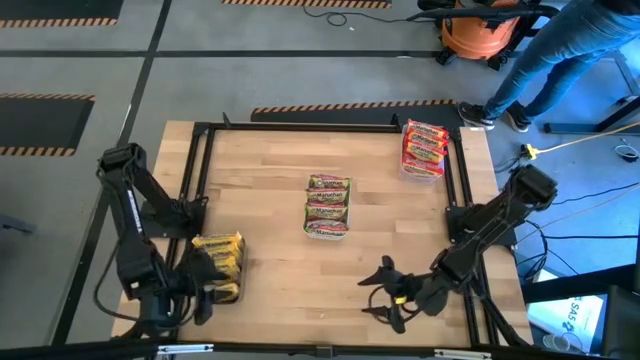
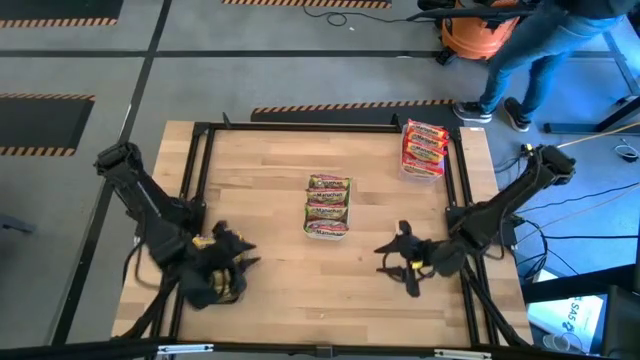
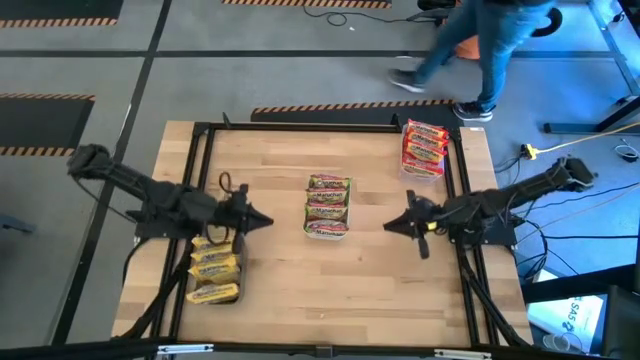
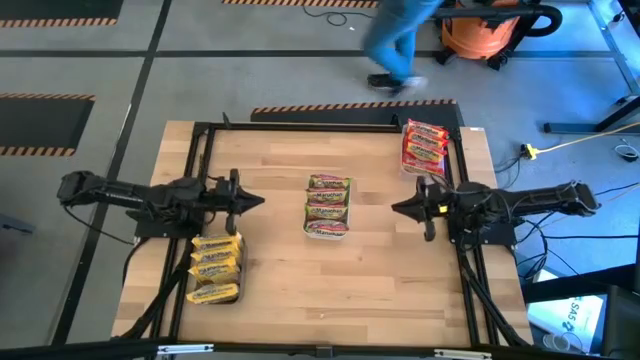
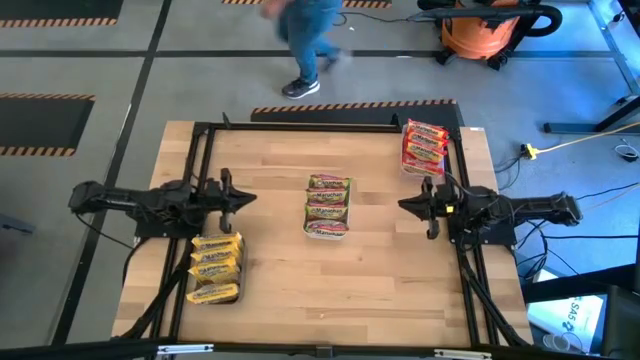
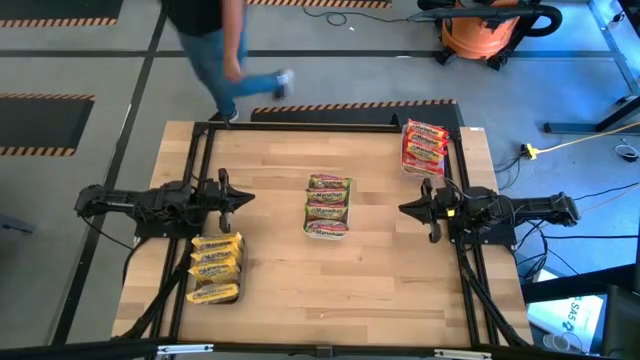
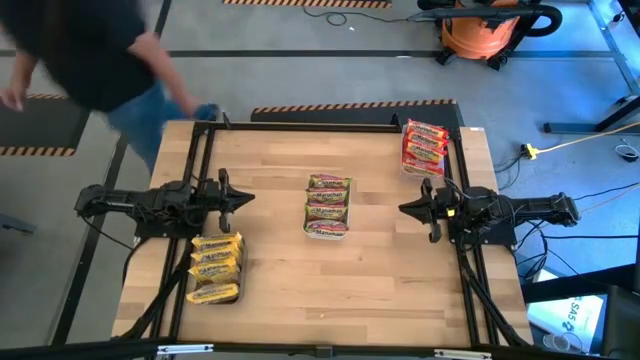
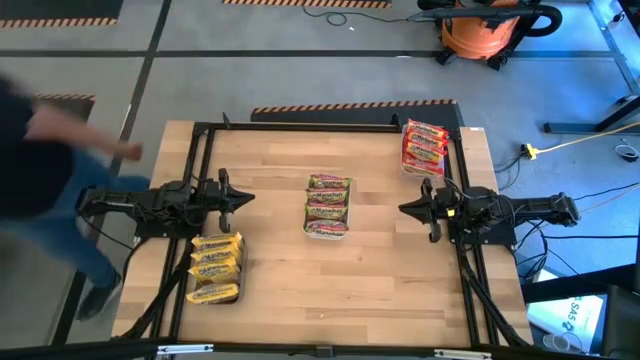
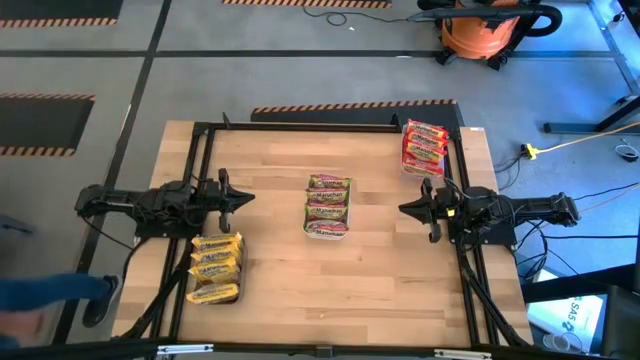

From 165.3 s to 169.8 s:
Task: Sort Maruchan noodles
Return to Home Position

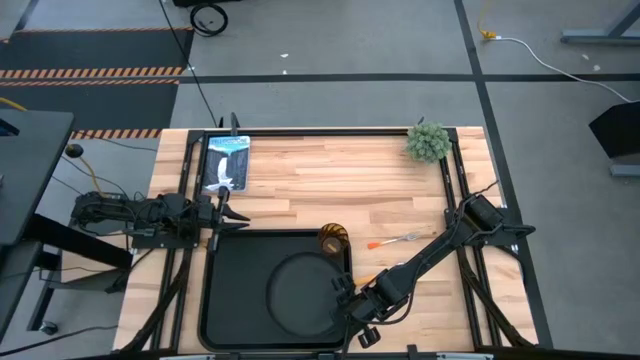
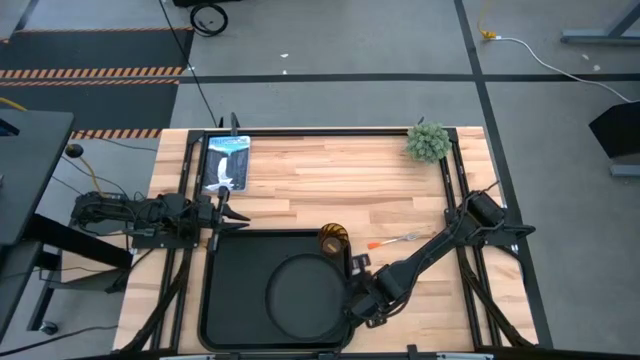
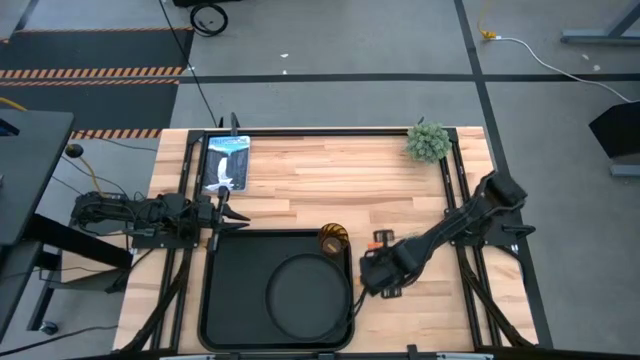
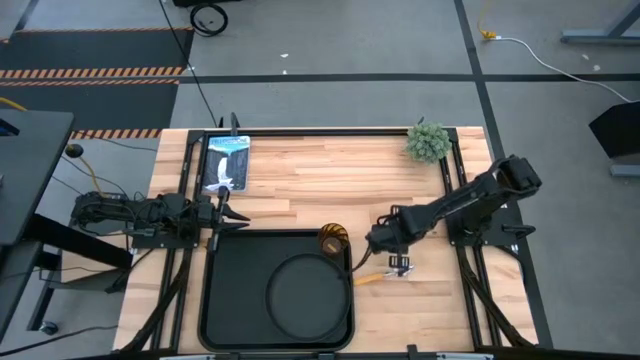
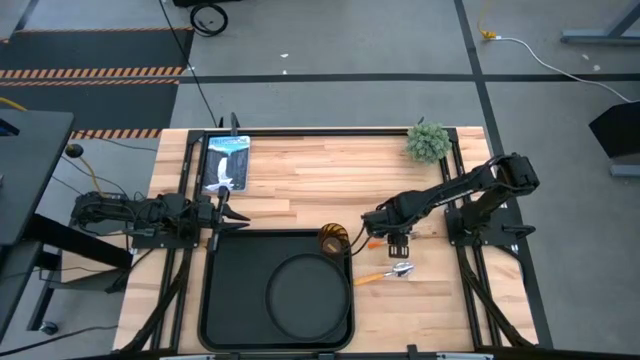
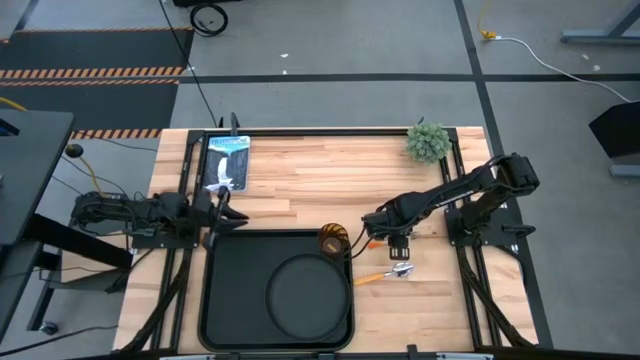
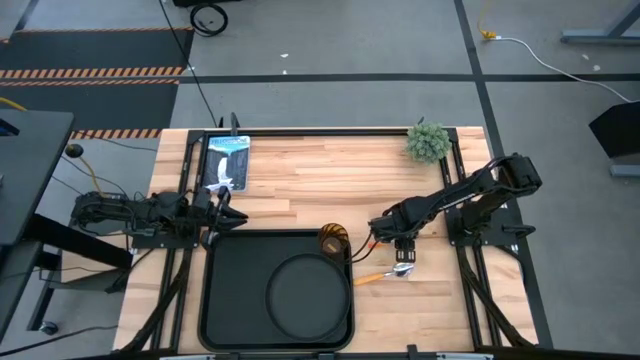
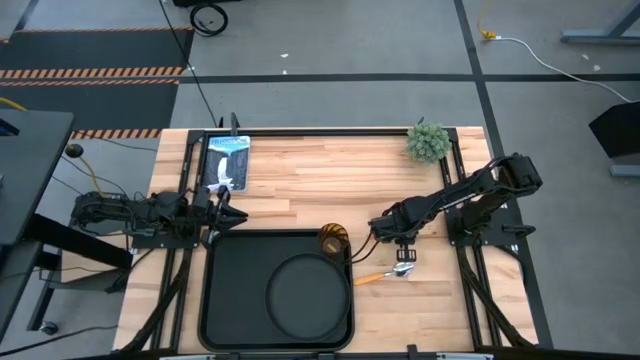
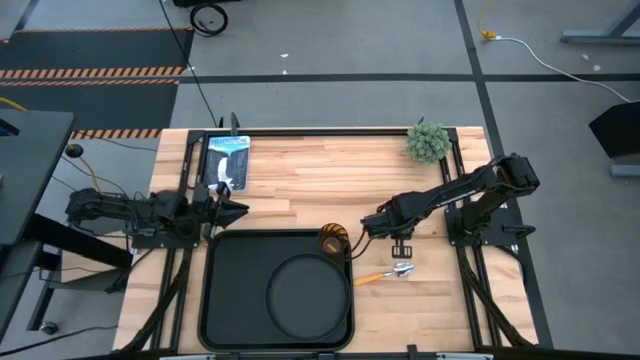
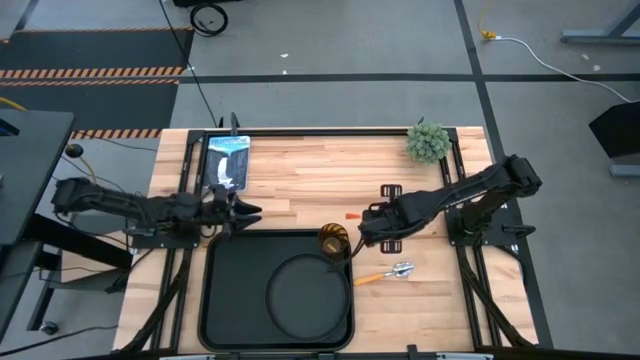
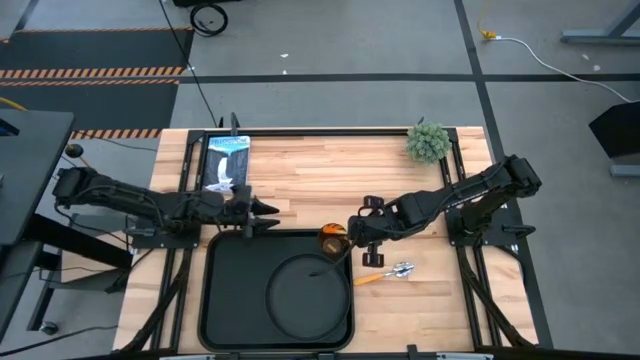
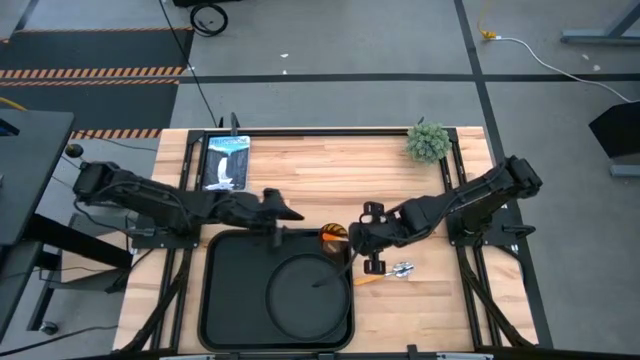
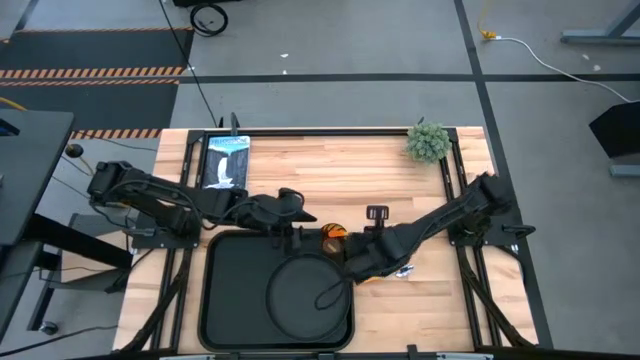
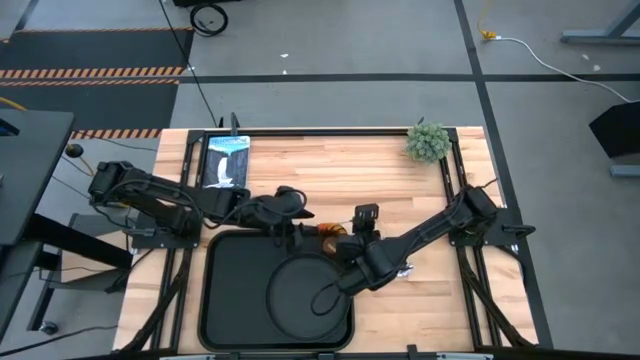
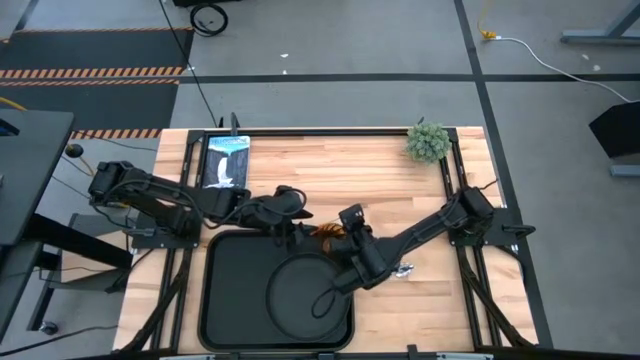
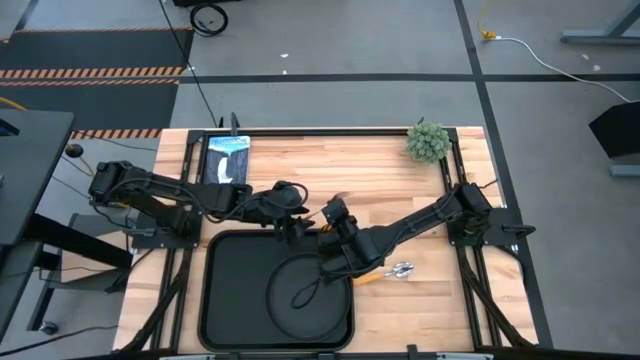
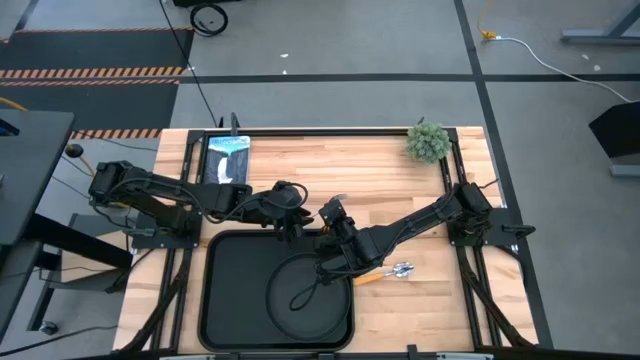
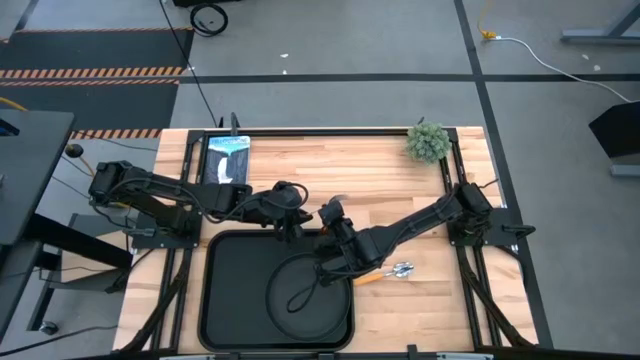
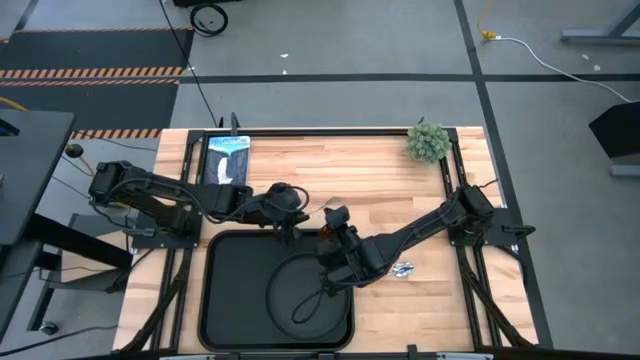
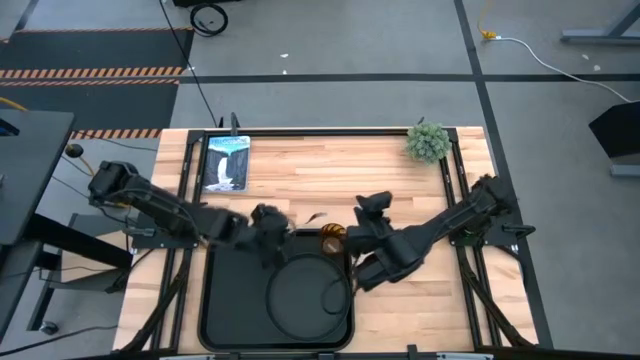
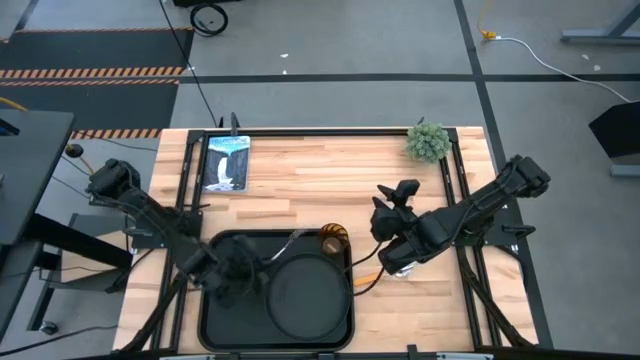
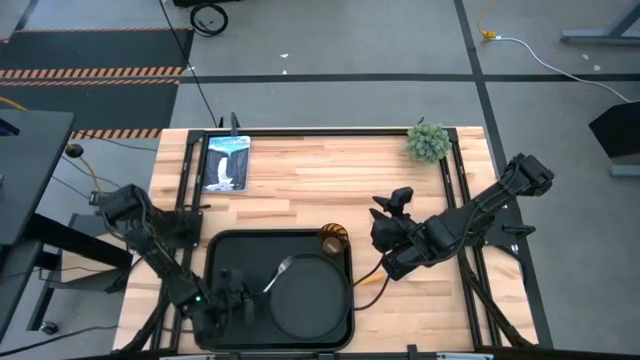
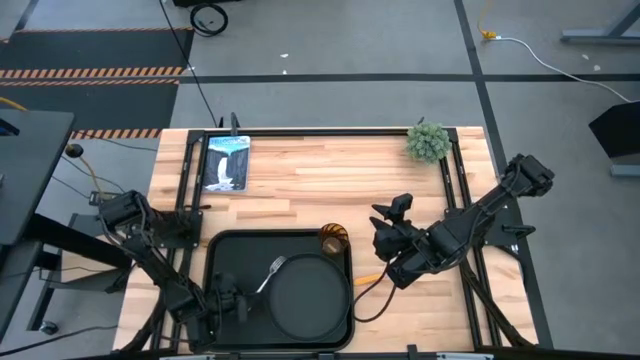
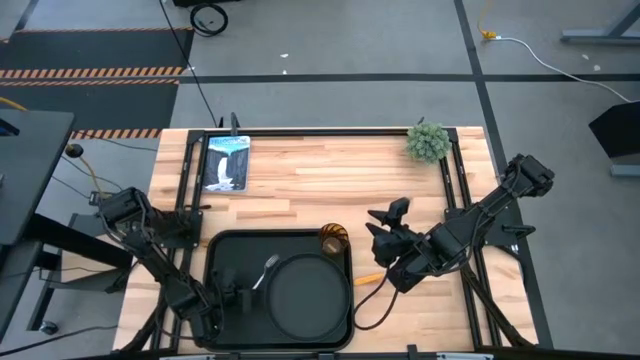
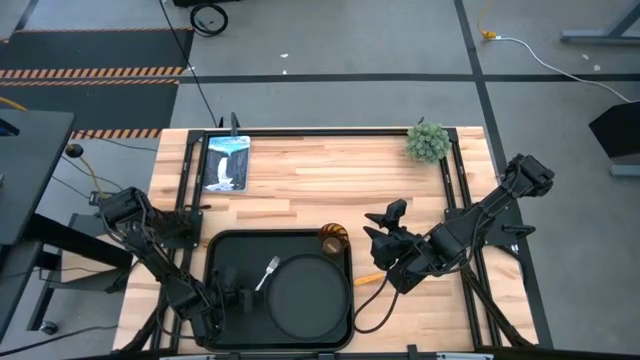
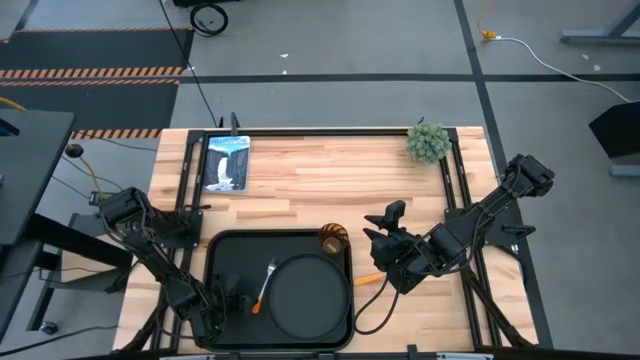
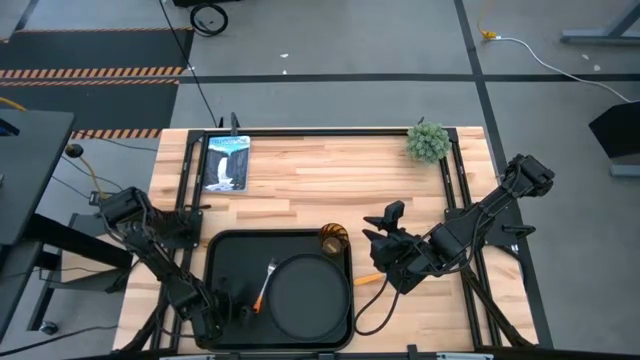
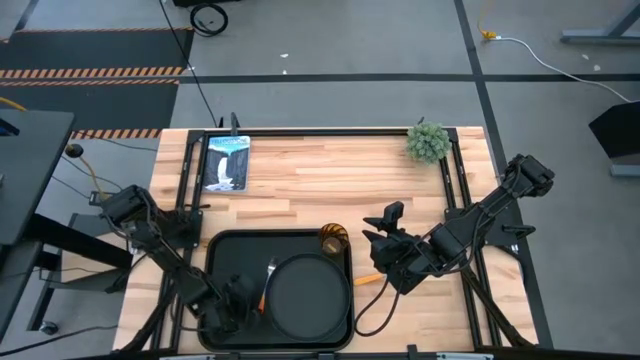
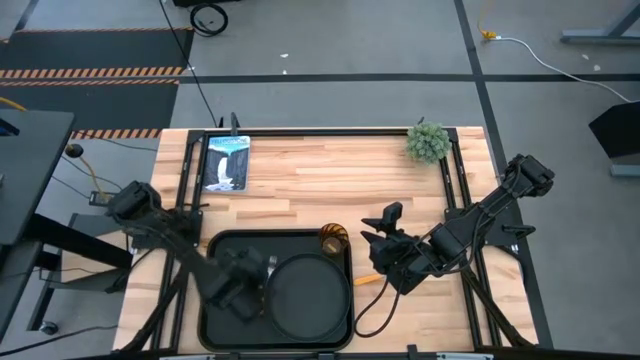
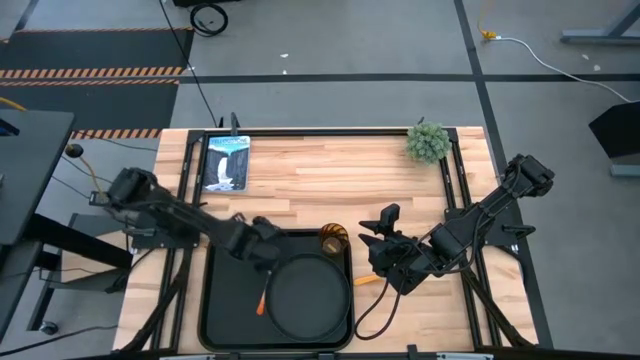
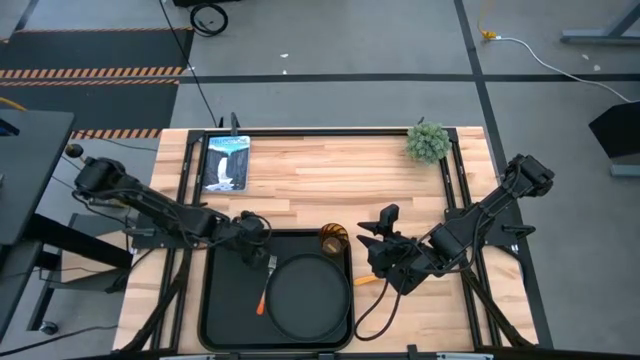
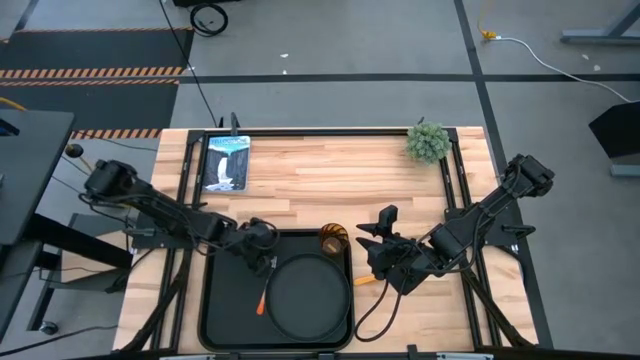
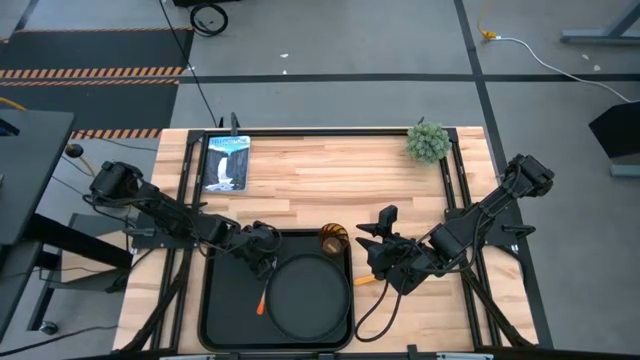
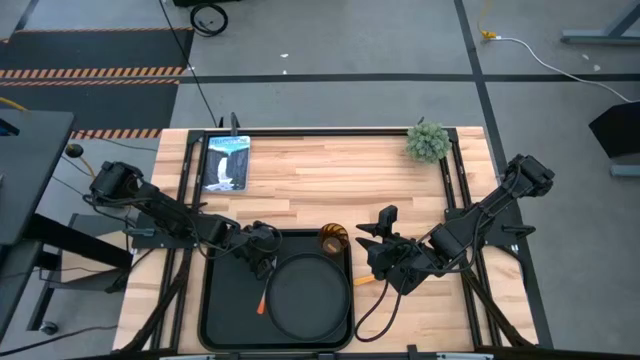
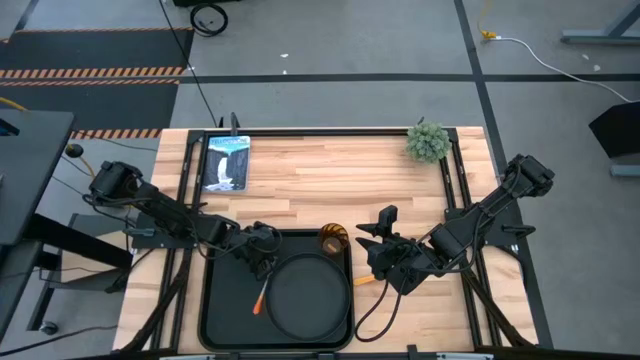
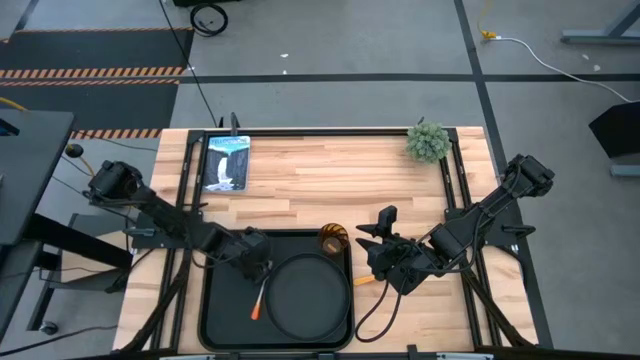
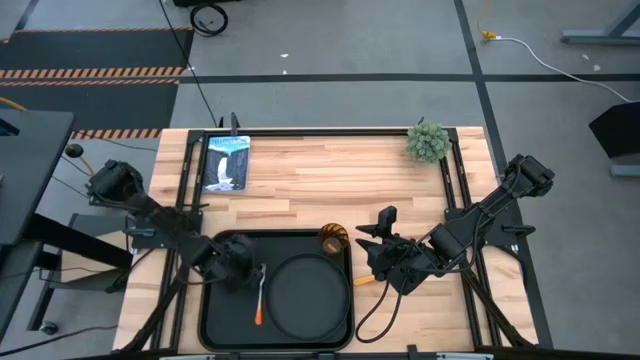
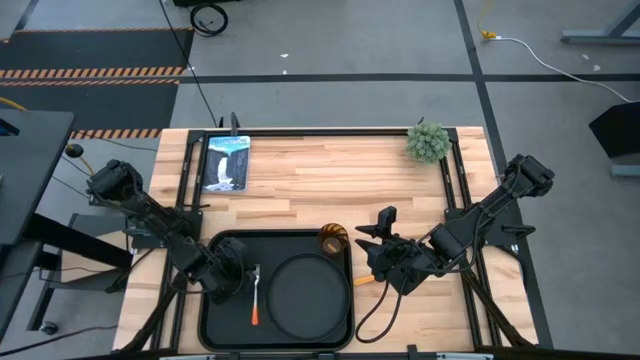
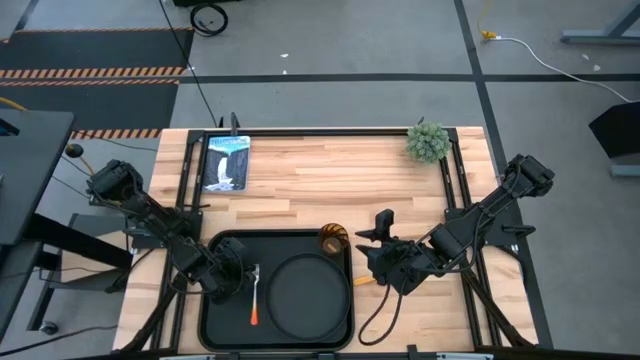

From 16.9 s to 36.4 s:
Task: Pick and place plate/cup/fork/spoon on tray
Put the orange fork on the black serving tray
